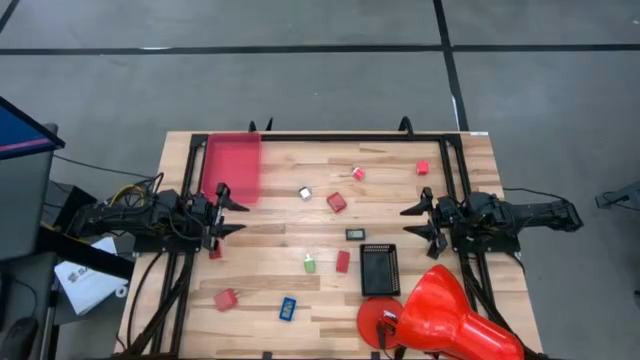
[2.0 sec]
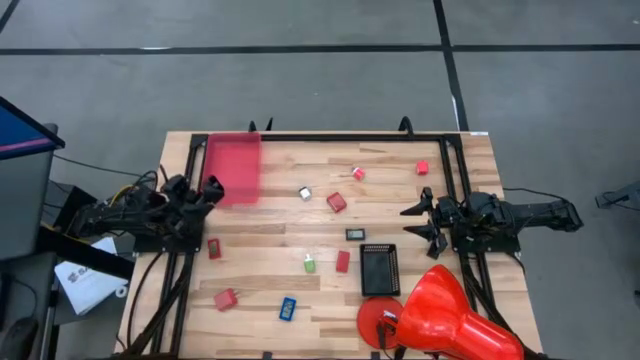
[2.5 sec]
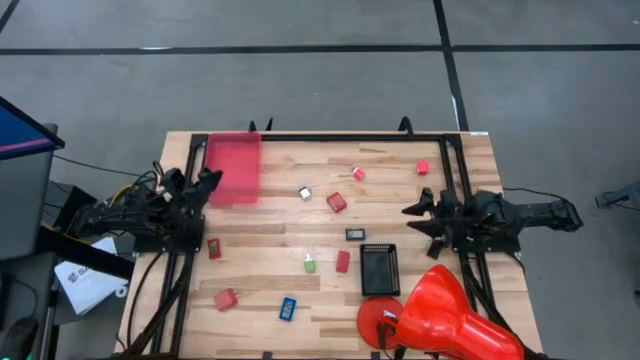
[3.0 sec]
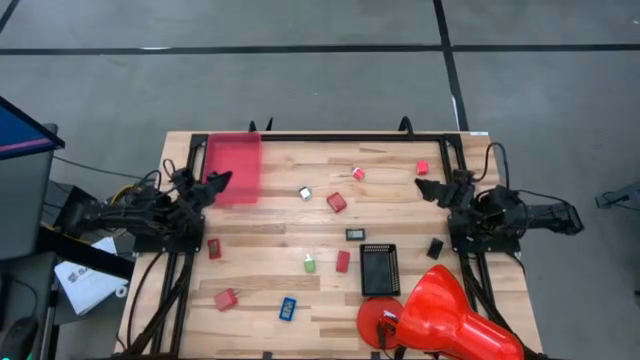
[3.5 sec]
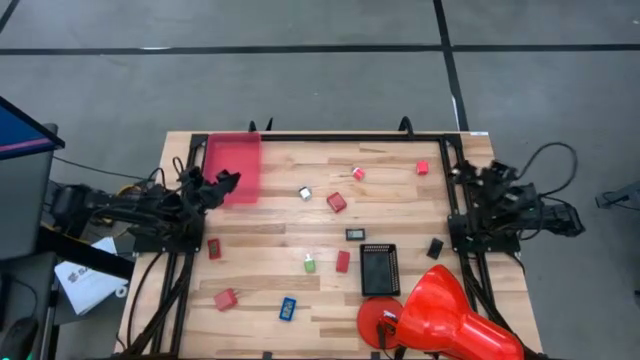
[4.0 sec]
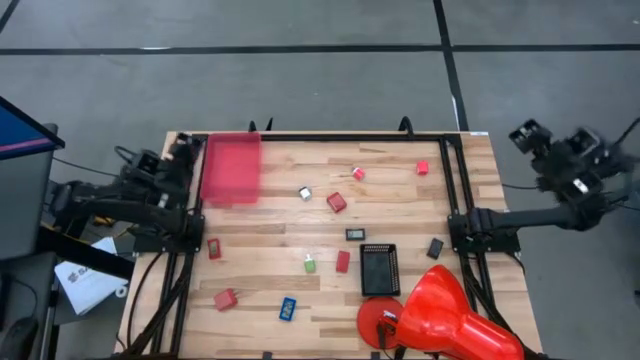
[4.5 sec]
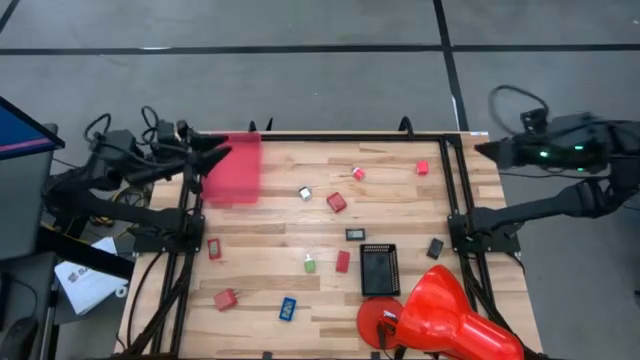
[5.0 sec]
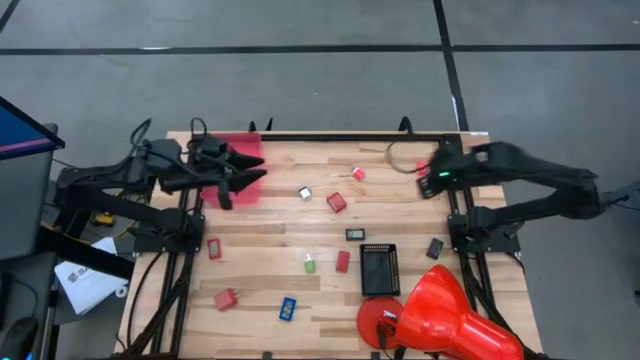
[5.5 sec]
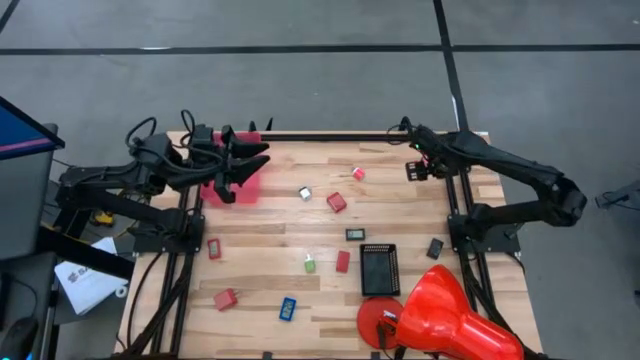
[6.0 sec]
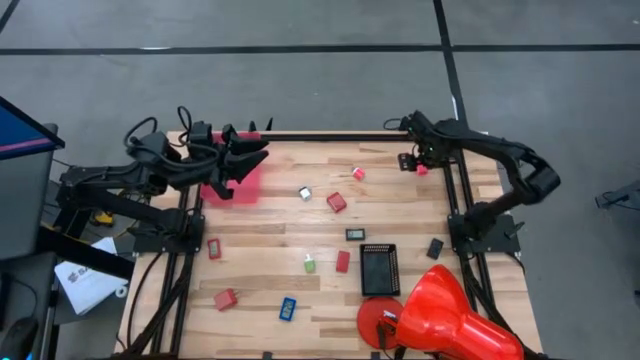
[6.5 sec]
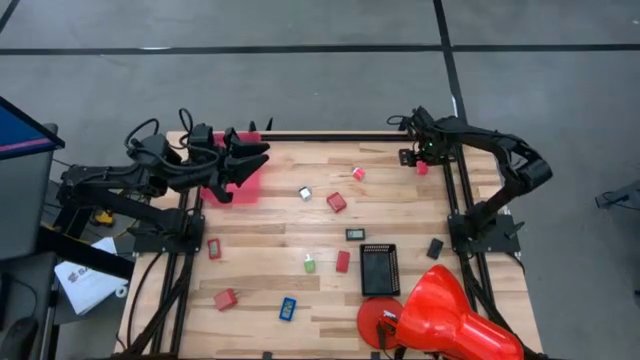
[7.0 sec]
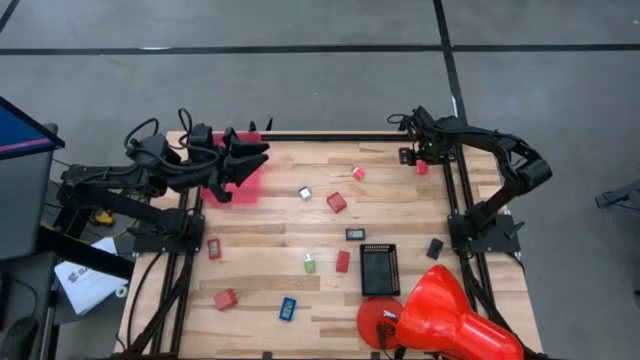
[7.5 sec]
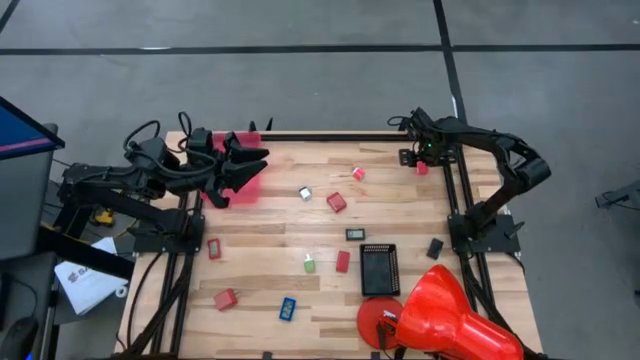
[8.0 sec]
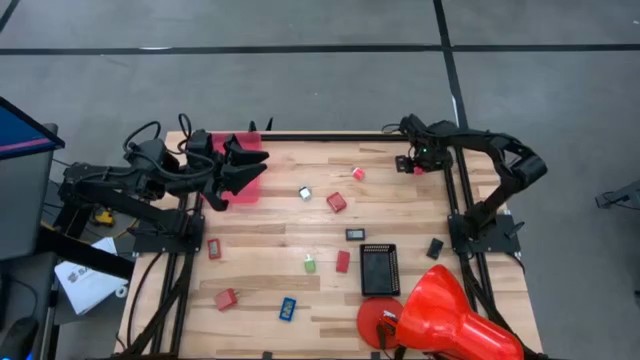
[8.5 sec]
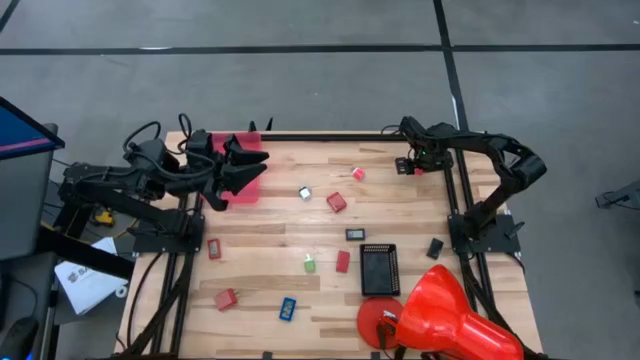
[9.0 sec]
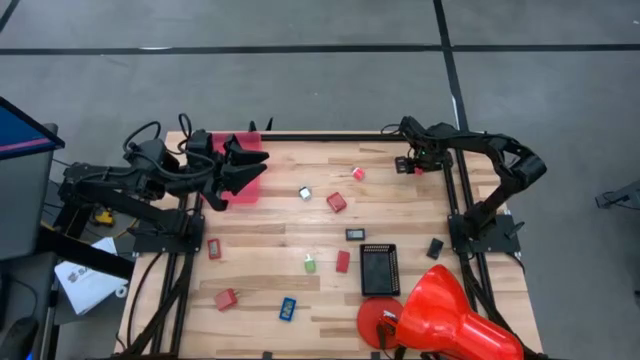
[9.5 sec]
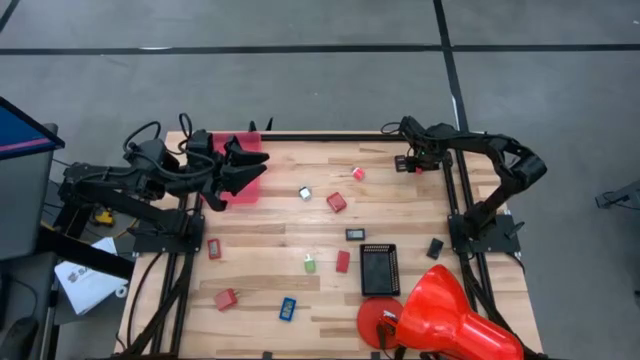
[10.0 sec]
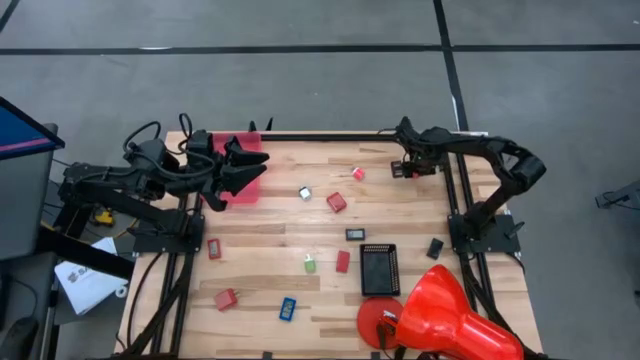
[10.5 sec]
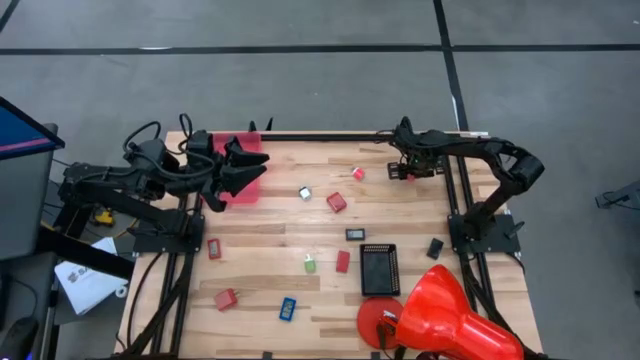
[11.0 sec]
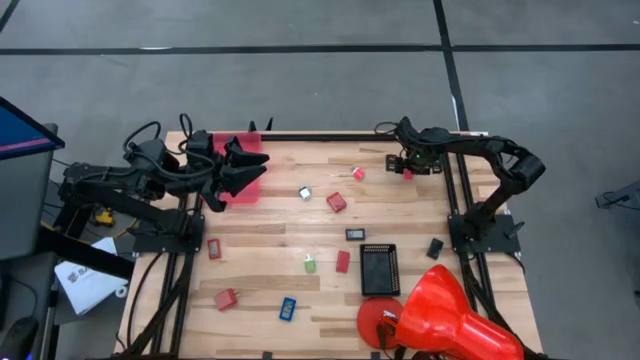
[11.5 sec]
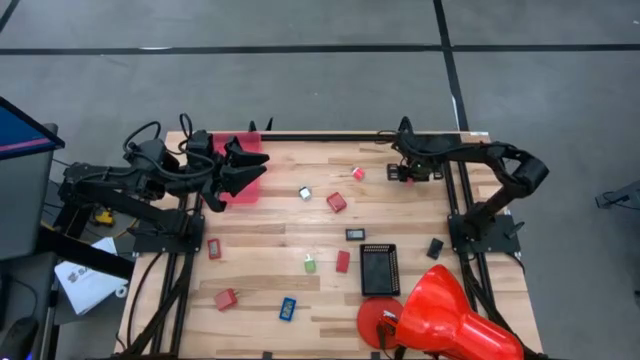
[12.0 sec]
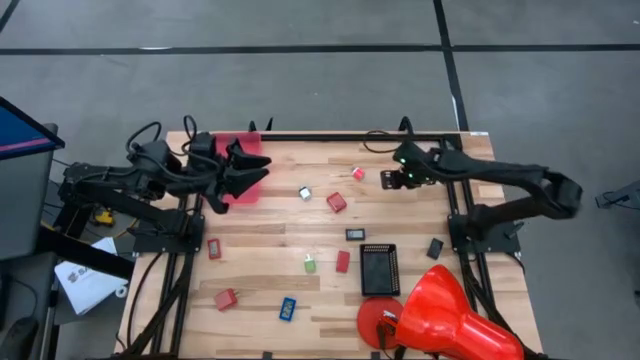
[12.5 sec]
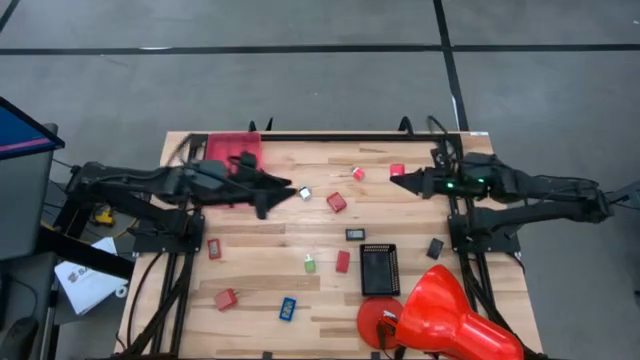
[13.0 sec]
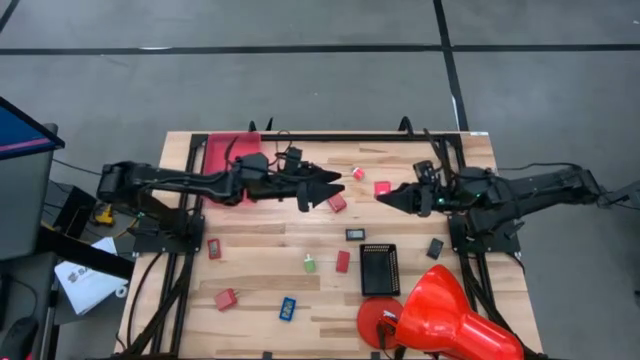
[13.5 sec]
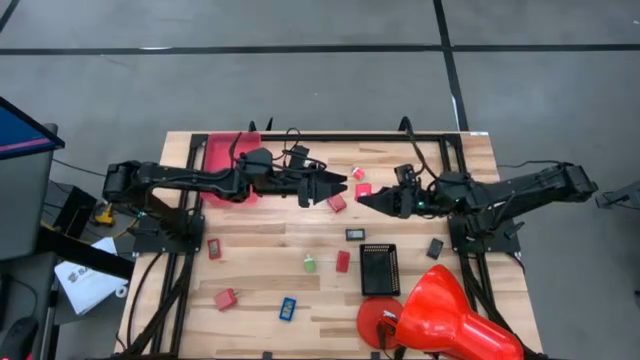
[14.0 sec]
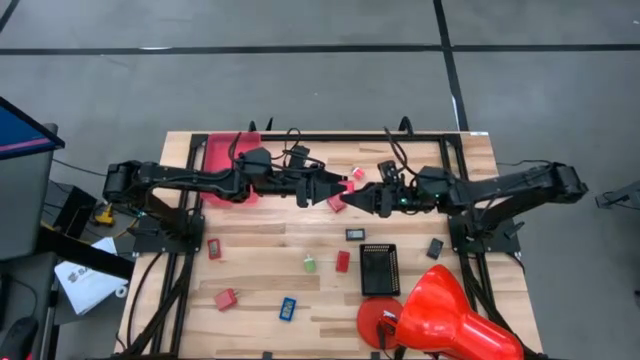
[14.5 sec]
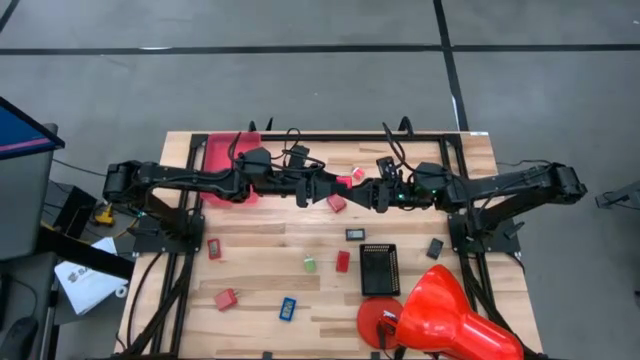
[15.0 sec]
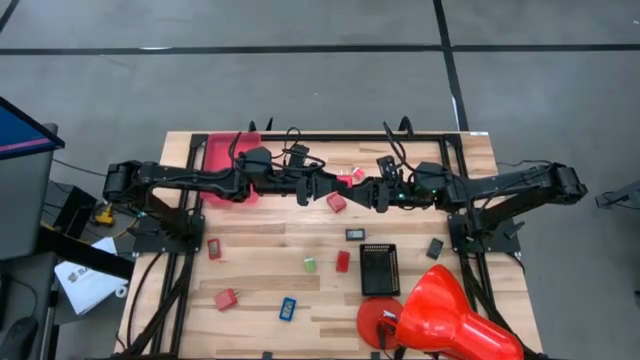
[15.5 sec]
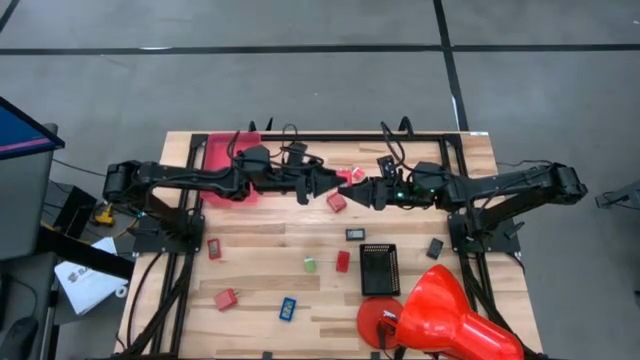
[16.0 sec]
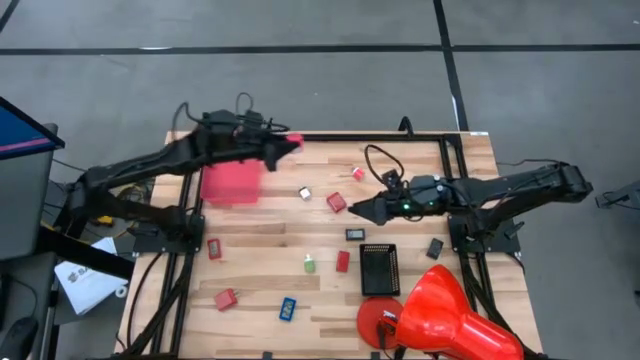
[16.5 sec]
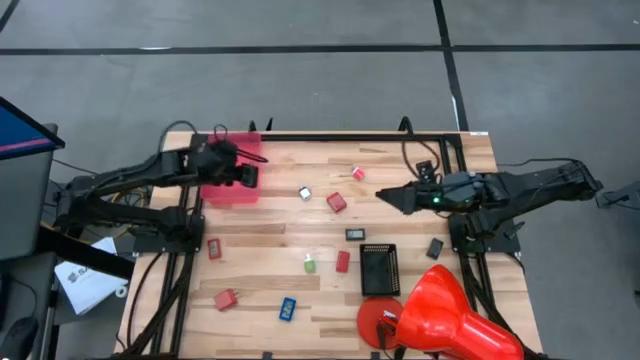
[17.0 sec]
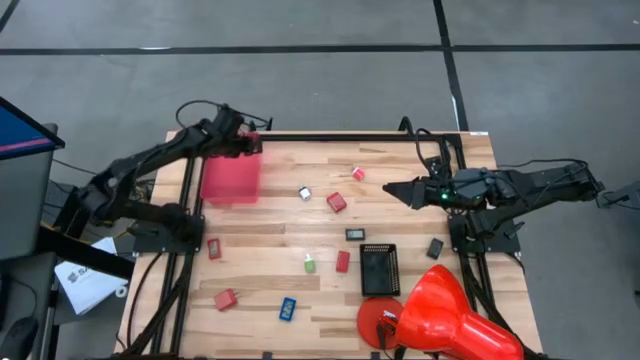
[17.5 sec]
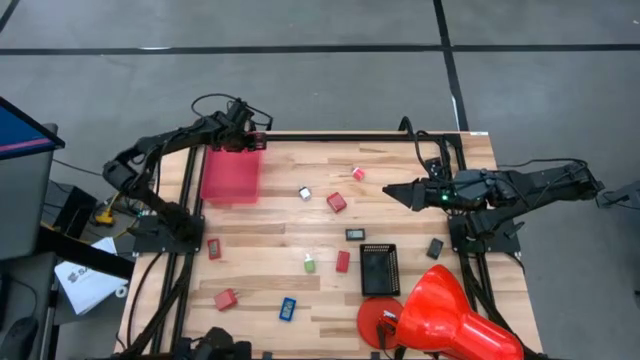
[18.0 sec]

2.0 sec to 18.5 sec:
Task: Pick & Place Office items
Put the pink charger adapter into the pink bin

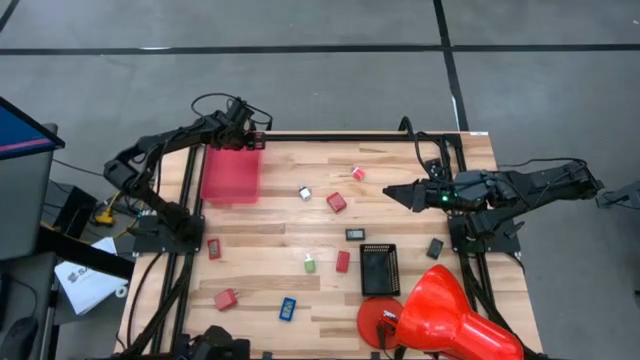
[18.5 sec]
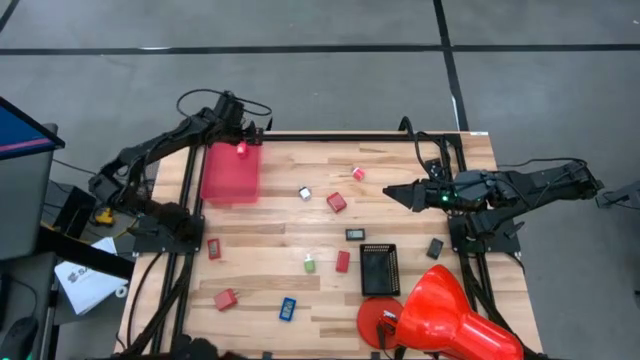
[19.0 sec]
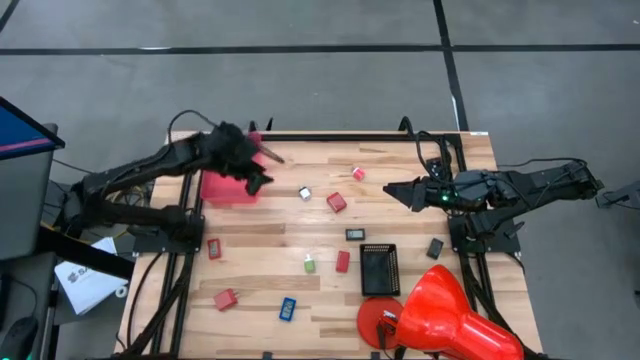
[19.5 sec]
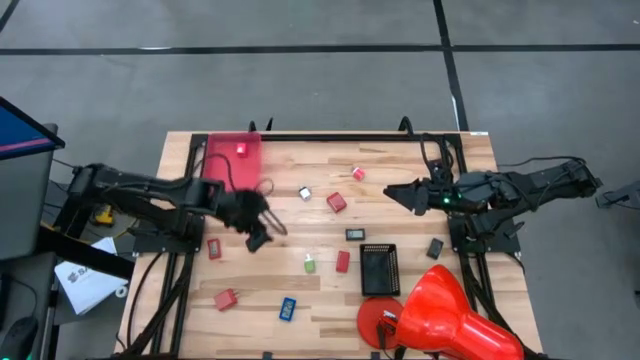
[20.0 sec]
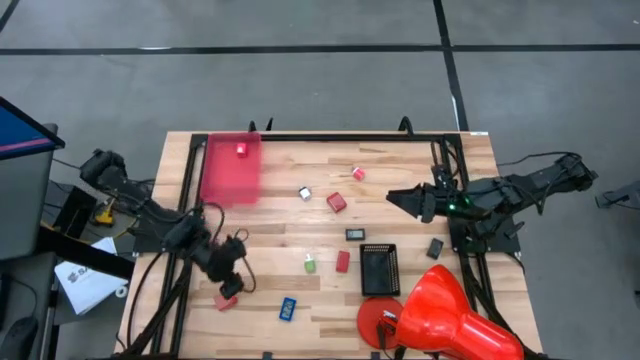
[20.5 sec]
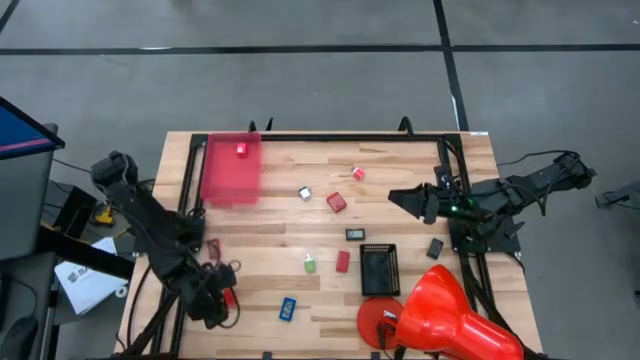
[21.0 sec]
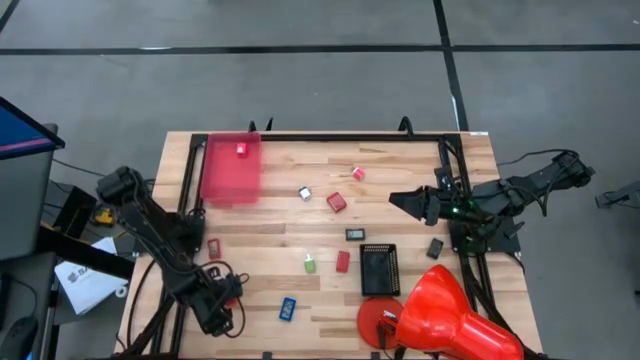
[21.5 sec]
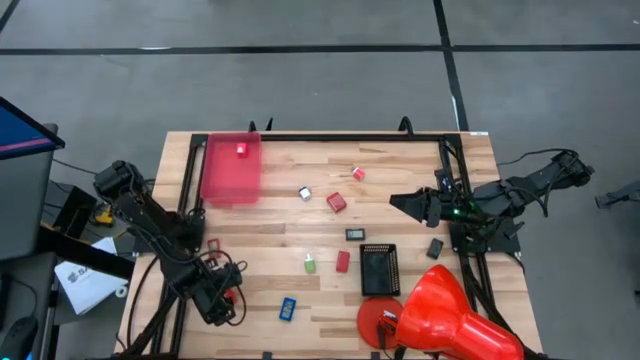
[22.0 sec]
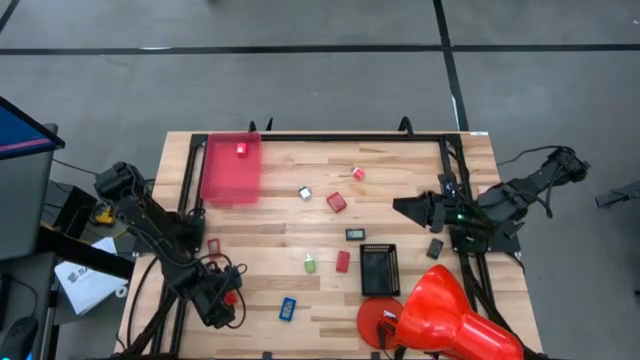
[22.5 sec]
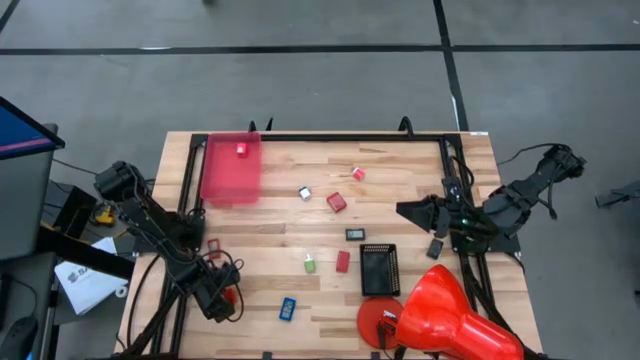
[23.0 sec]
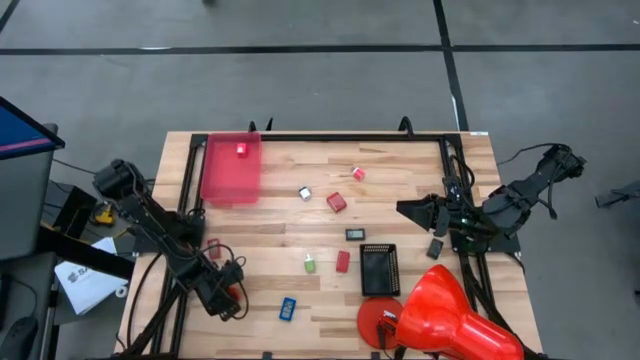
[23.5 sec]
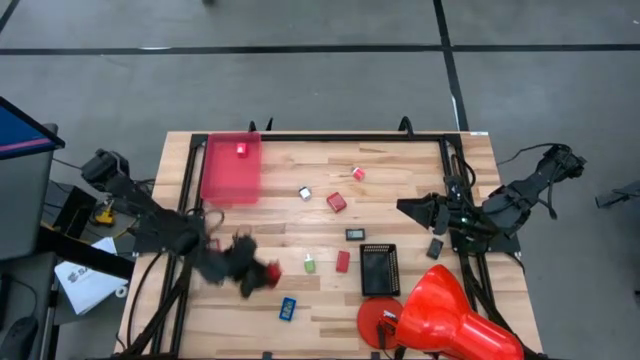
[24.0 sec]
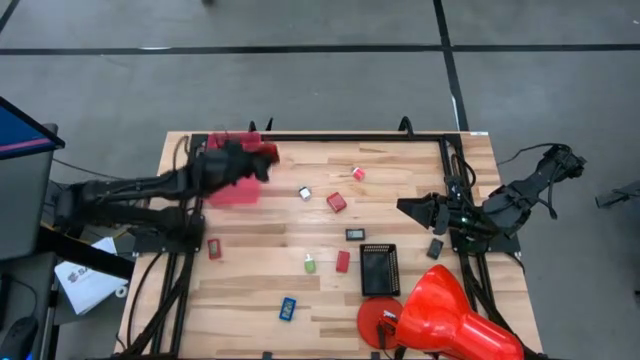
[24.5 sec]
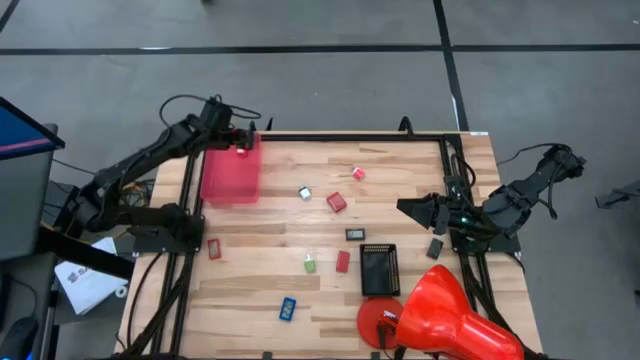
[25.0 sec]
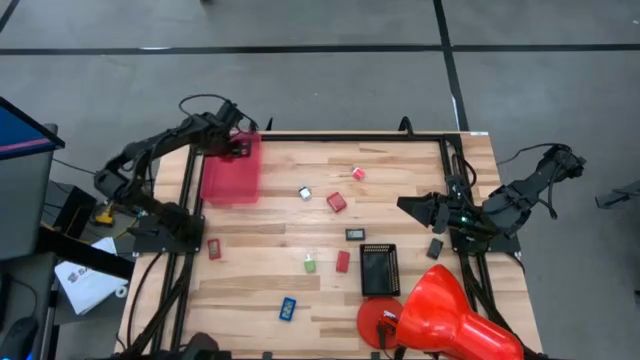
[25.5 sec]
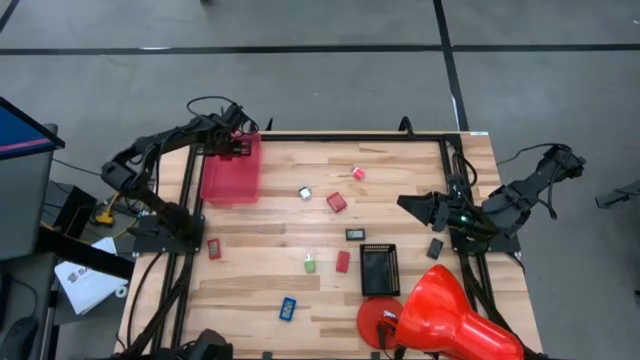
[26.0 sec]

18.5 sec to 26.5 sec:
Put the bottom red charger adapter into the pink bin
